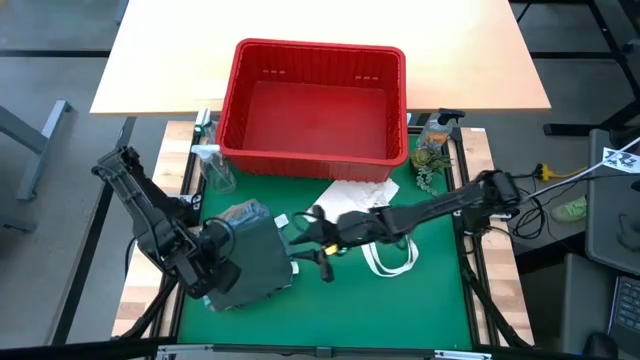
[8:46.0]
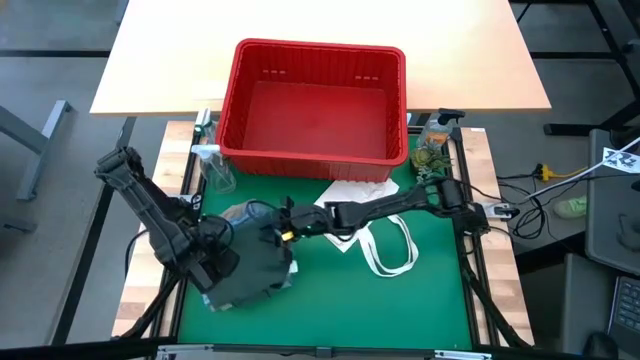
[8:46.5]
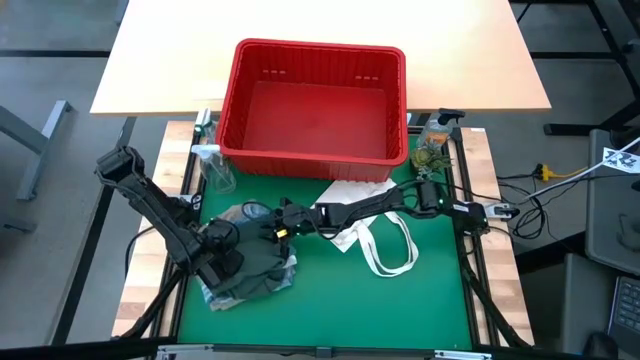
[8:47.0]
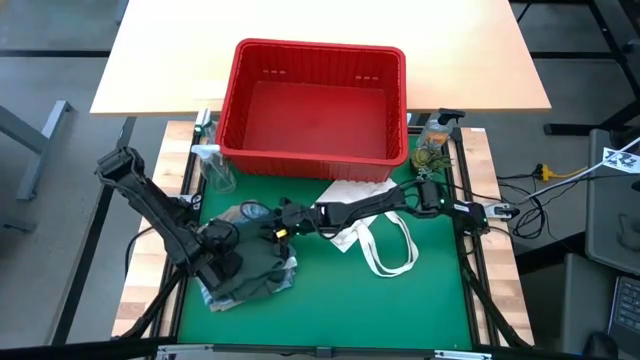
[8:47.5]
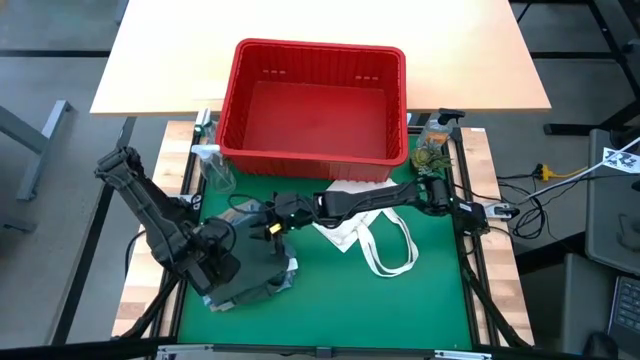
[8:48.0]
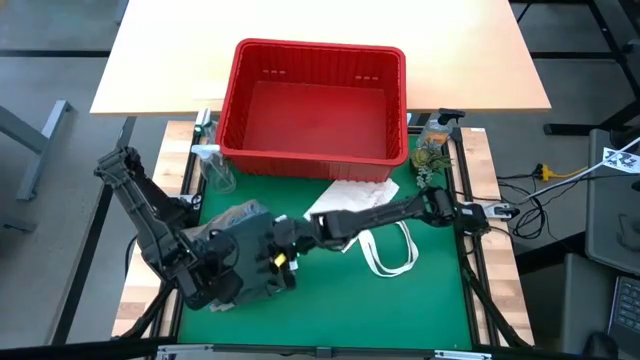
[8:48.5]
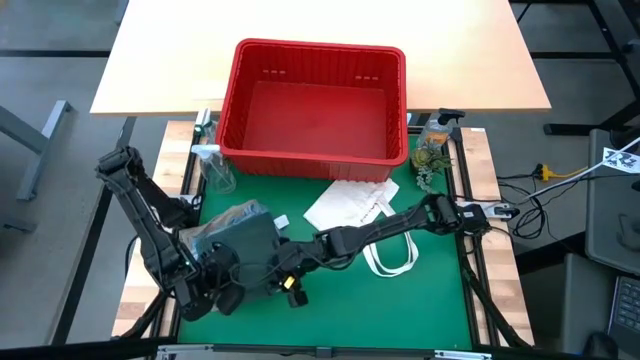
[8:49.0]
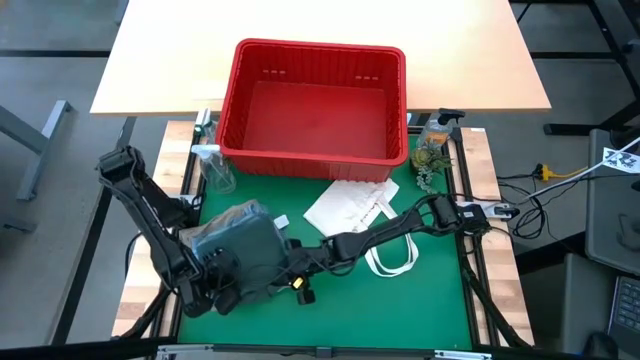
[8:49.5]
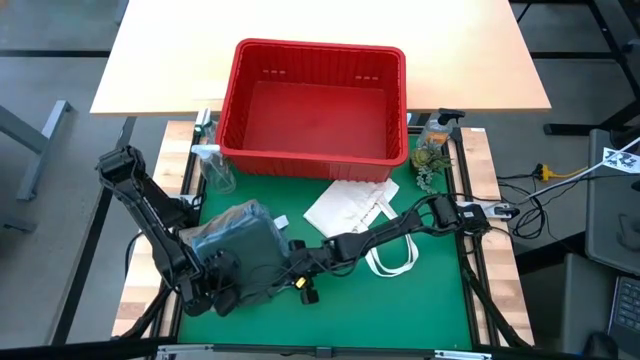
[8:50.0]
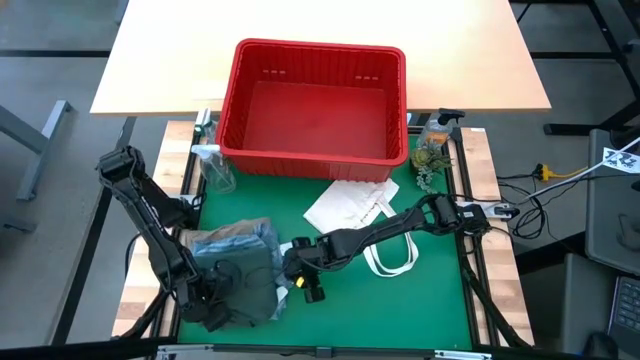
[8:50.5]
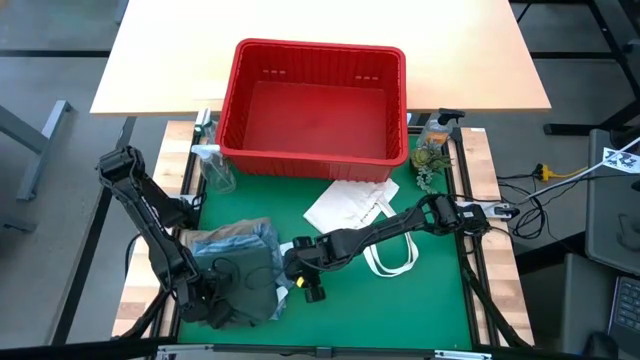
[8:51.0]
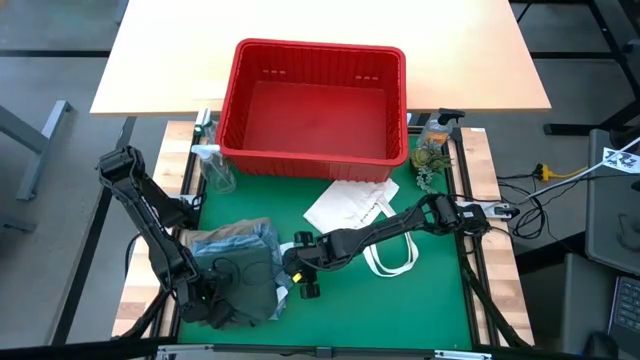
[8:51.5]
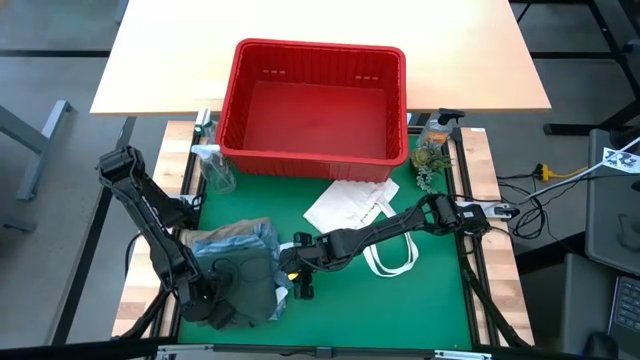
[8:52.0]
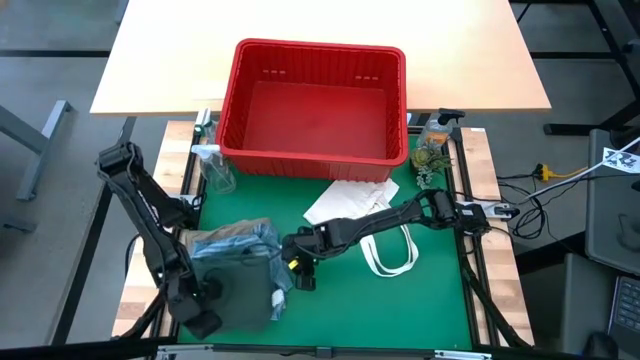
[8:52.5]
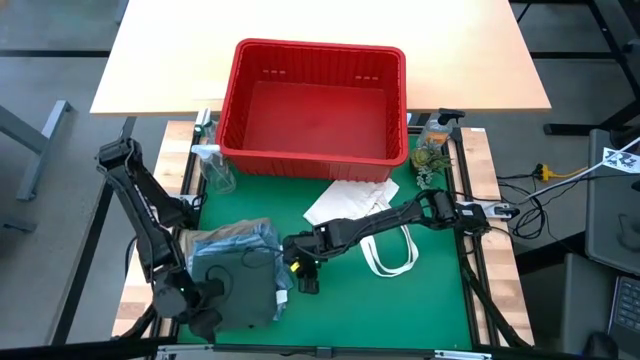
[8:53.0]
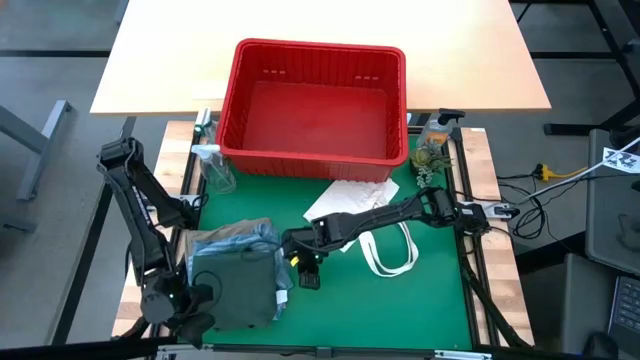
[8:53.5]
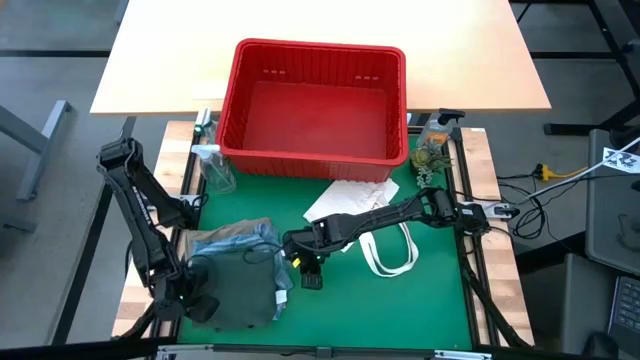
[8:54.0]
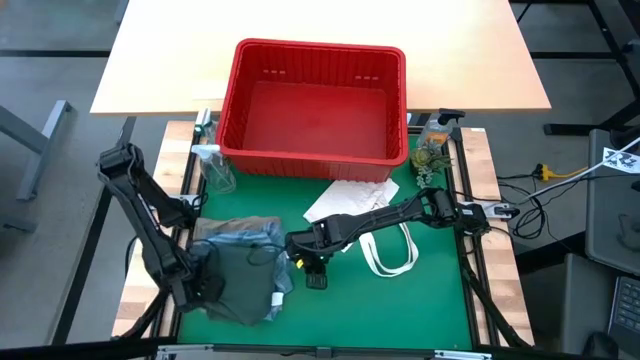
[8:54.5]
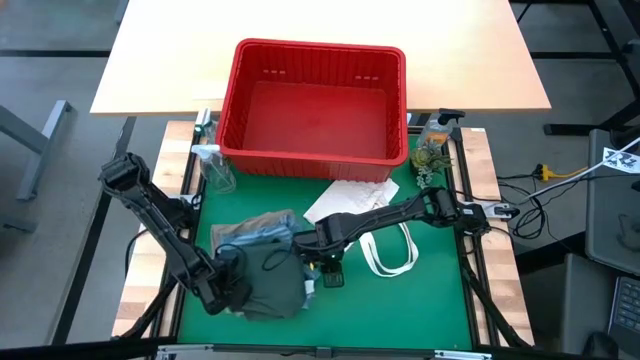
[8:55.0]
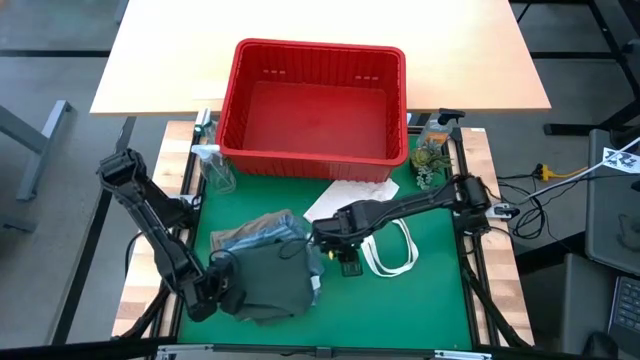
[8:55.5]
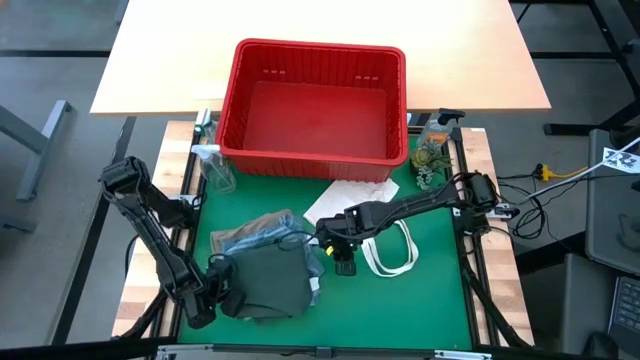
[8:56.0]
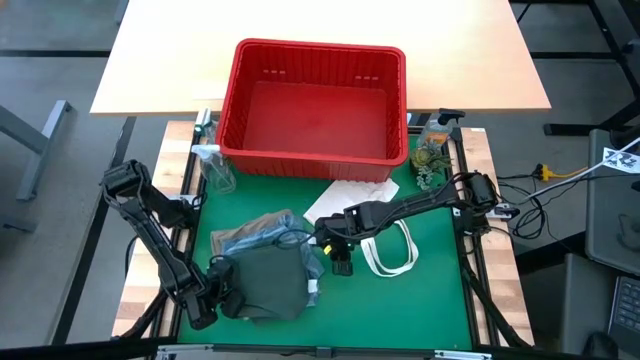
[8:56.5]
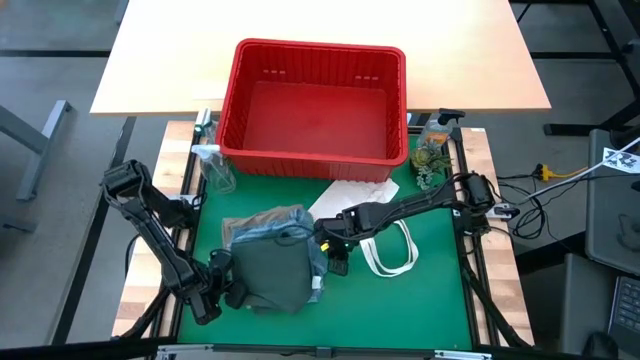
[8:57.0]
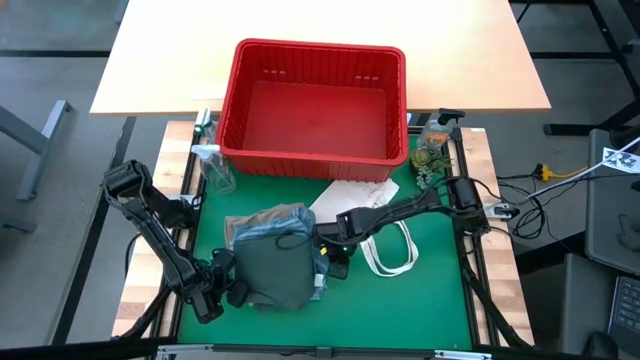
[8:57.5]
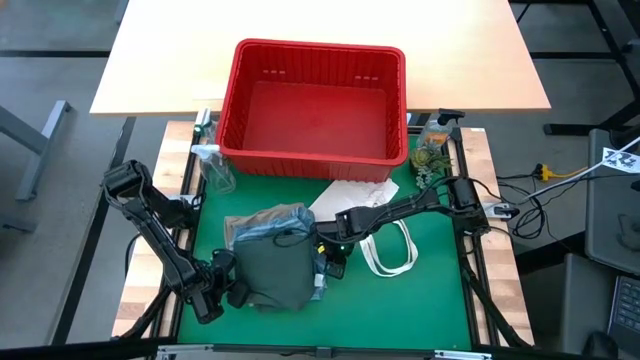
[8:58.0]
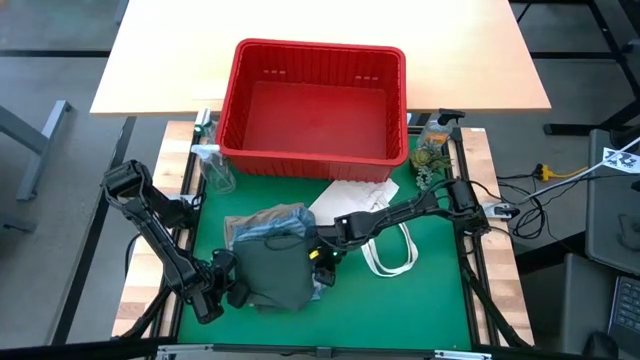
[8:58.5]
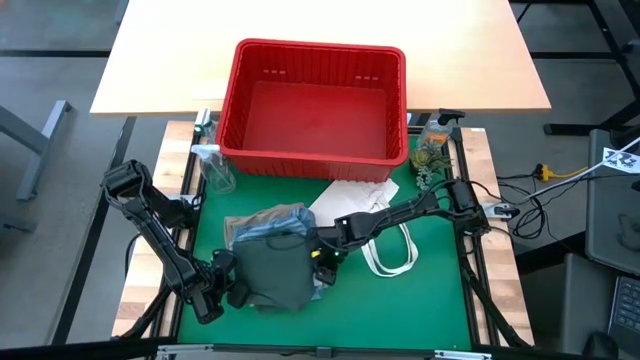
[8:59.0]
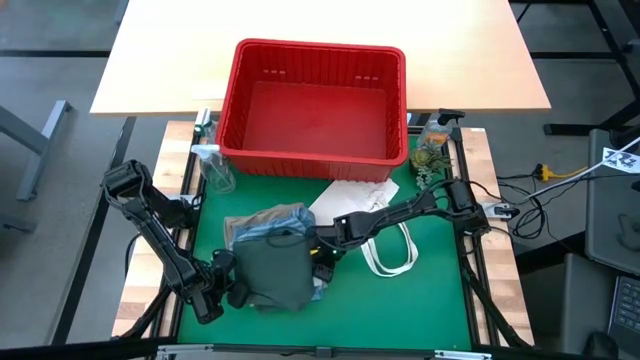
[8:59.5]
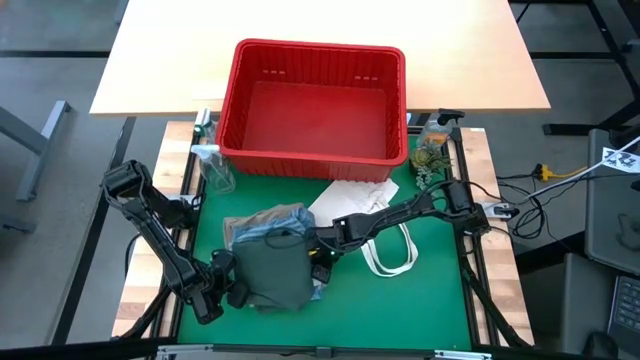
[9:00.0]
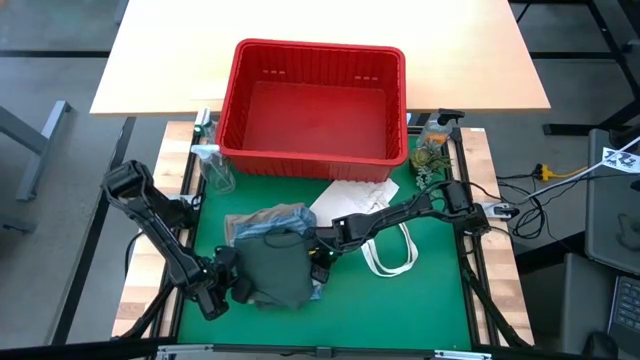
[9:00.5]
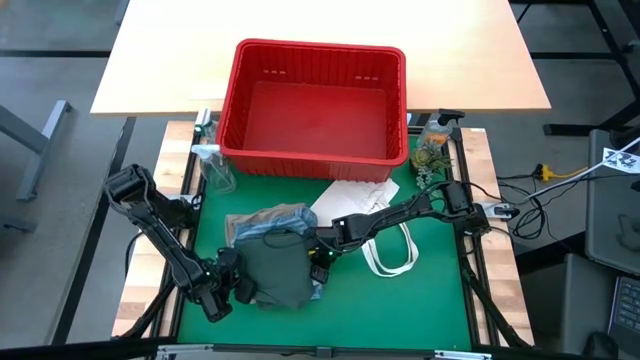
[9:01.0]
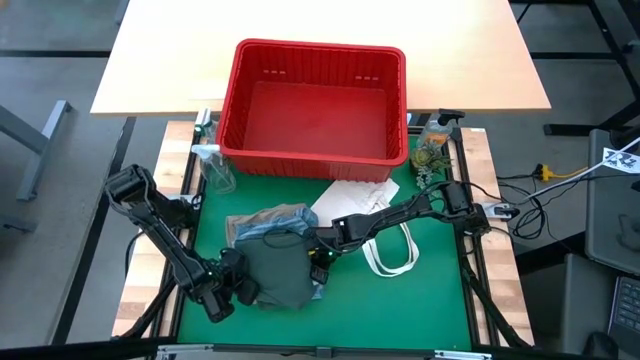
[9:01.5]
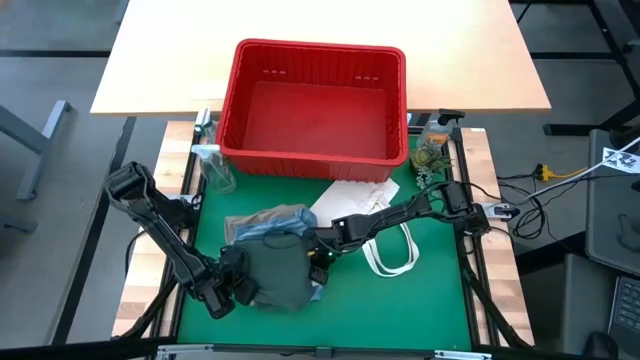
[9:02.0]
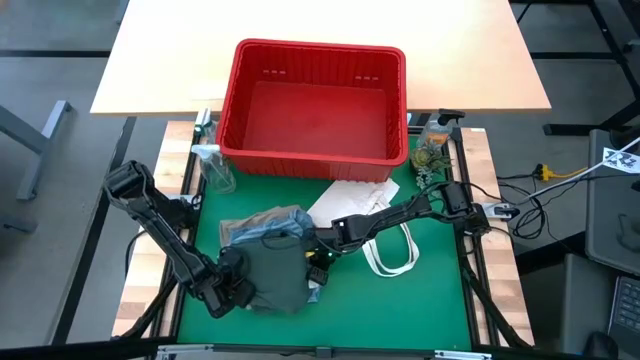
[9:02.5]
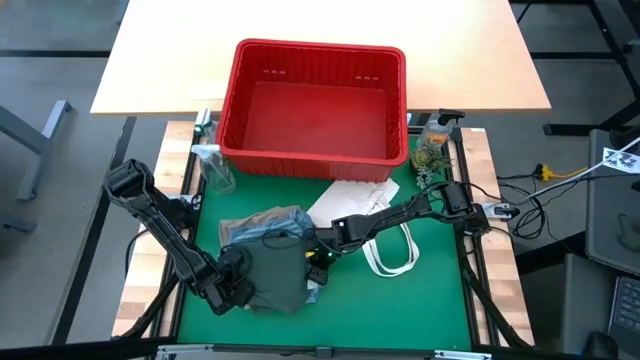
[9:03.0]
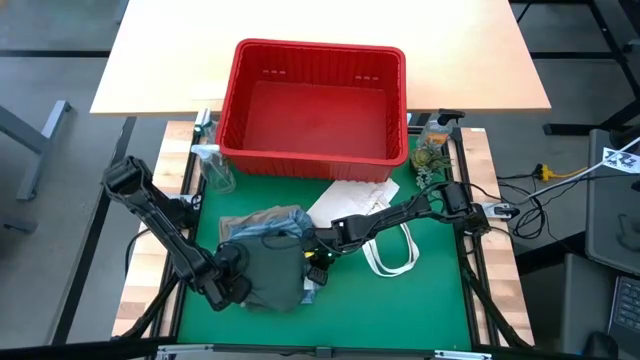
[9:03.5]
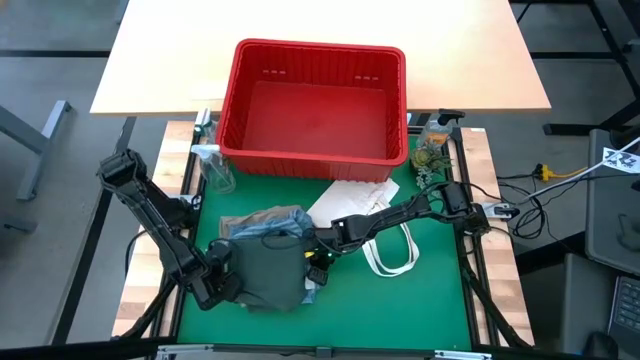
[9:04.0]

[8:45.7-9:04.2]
Task: Fold Laundry from Bin
Put all the stacked clothes into the red bin
